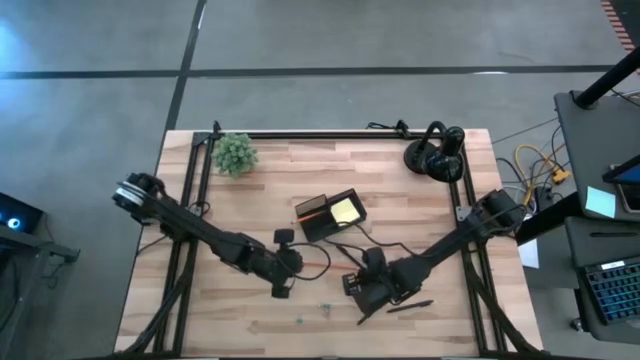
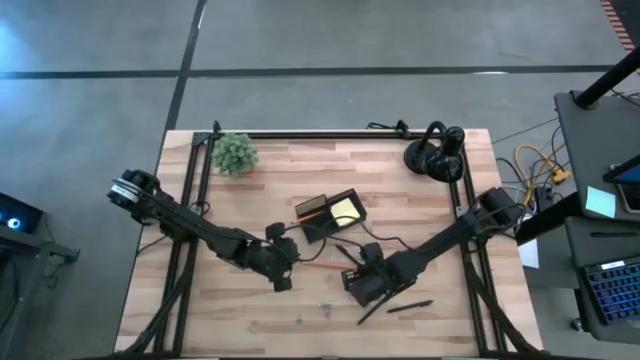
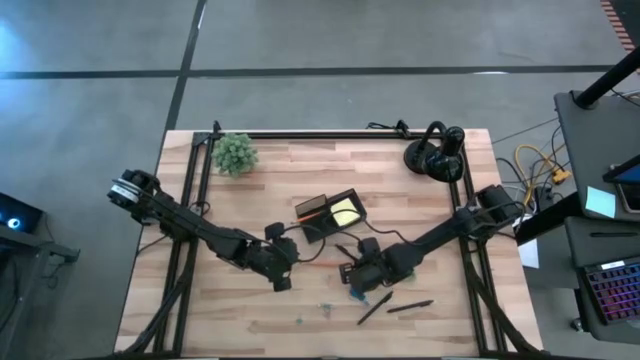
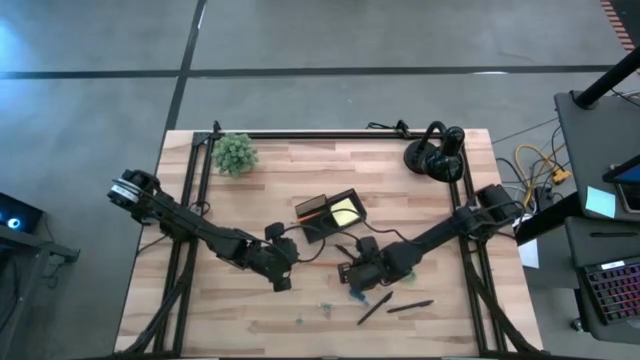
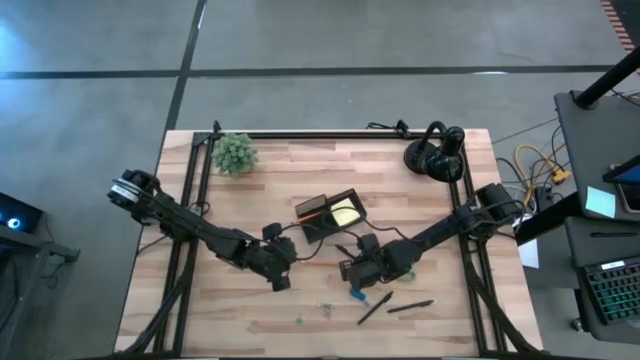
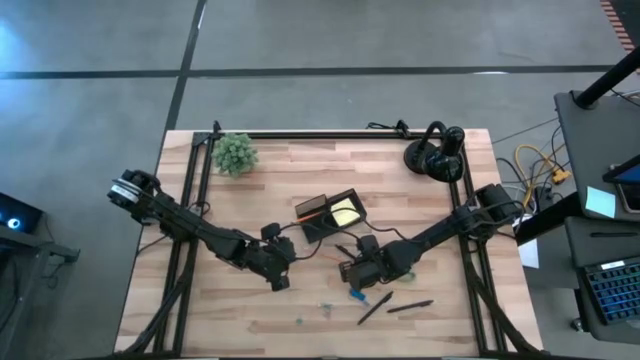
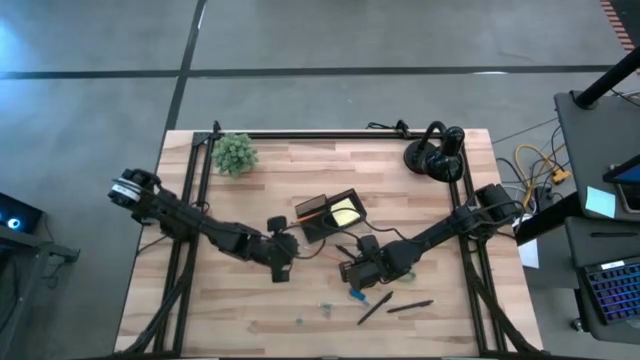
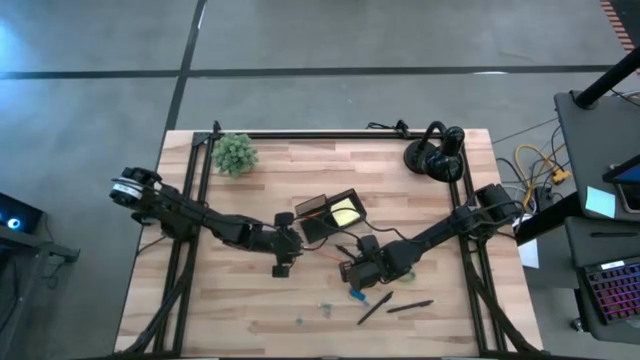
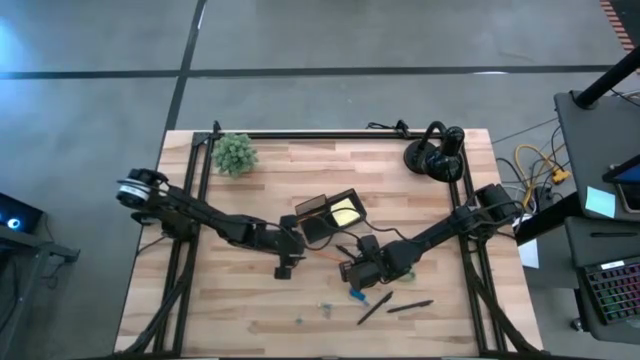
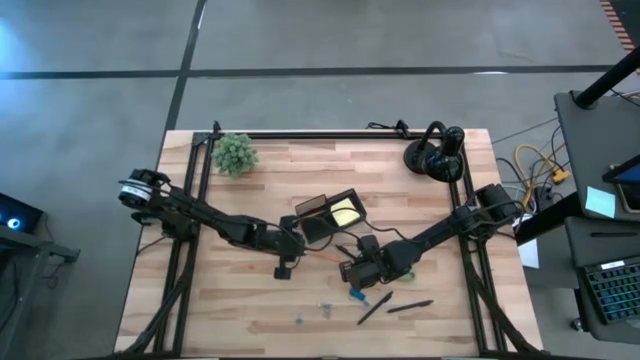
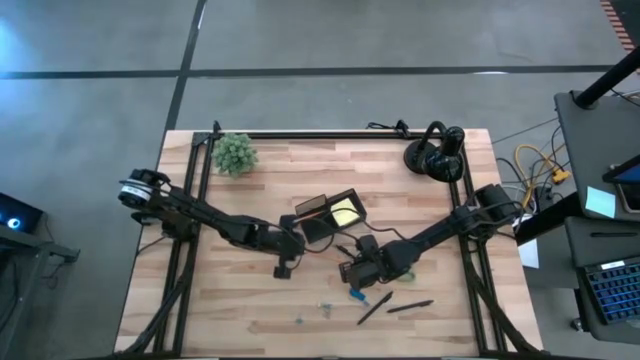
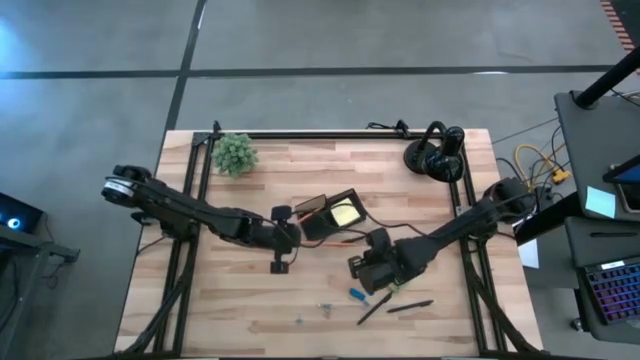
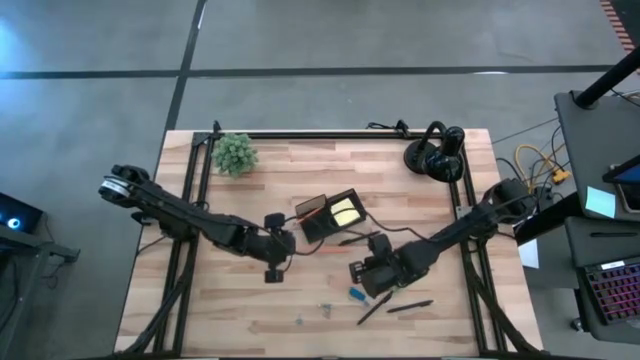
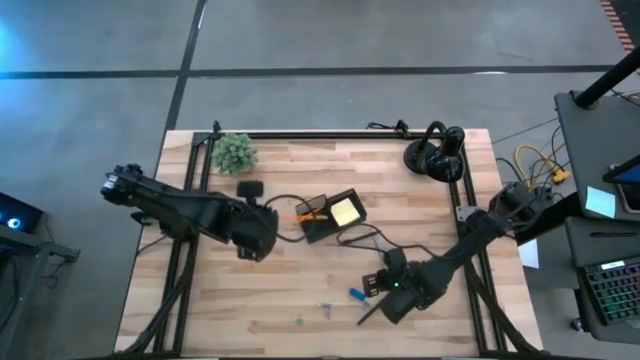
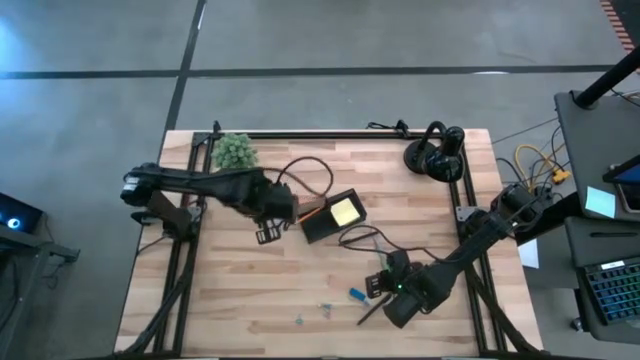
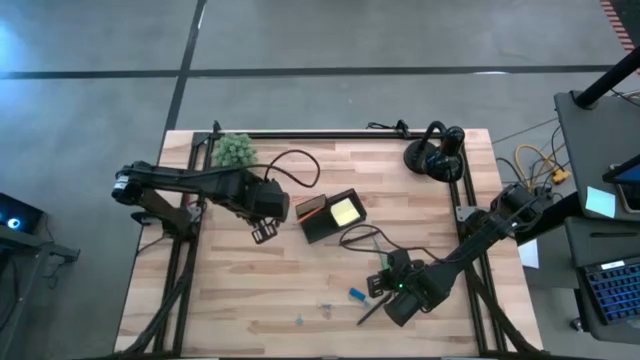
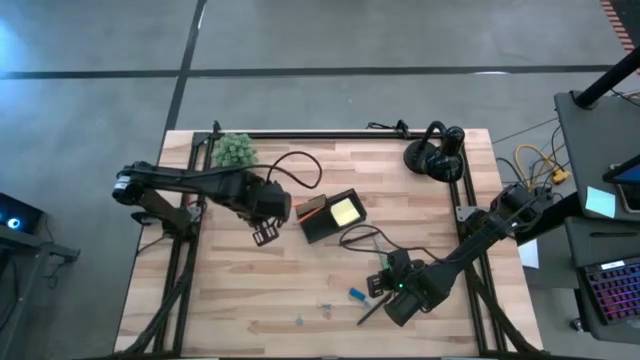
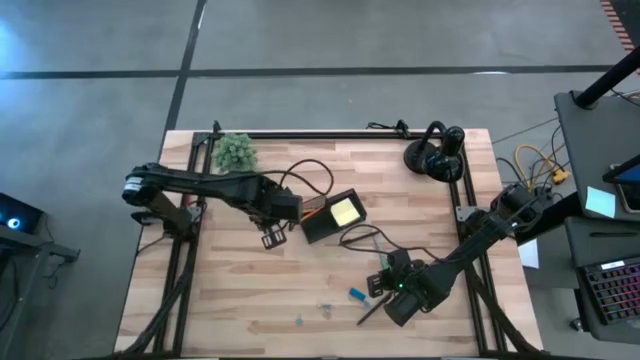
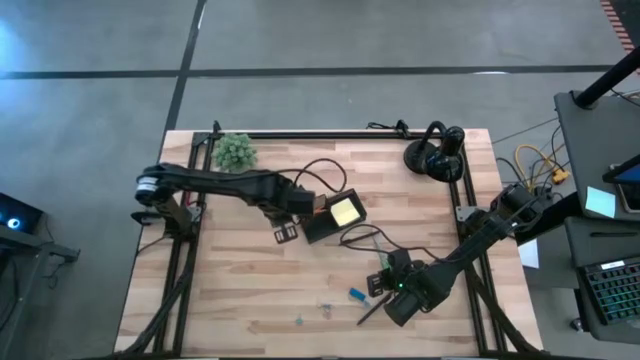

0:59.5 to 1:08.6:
Task: Pick and place office supplies into organizer
Put the orange pencil into the black desk organizer

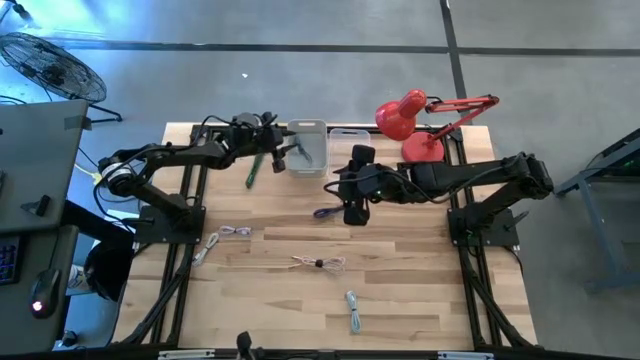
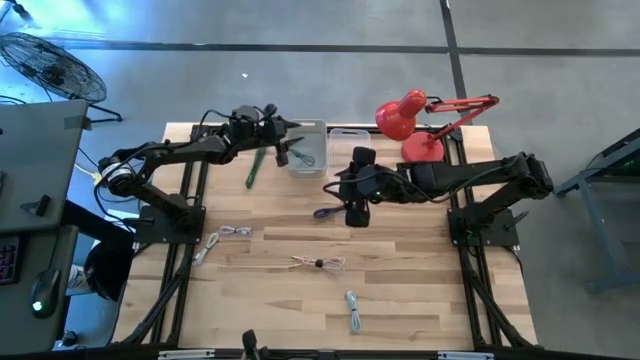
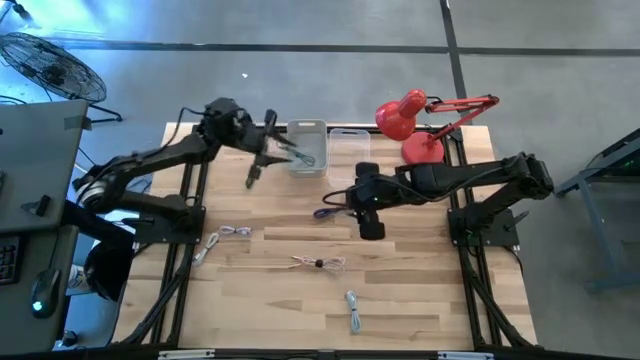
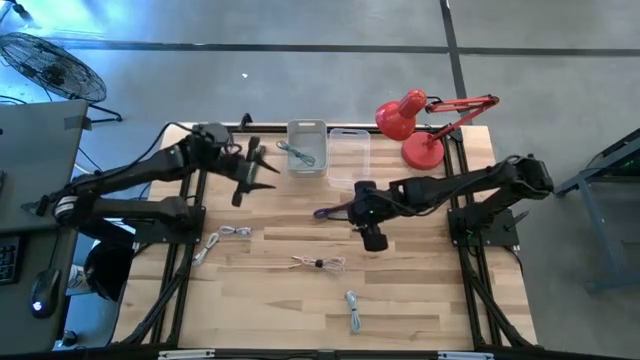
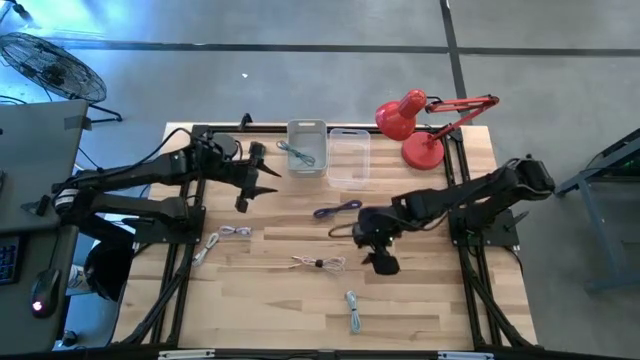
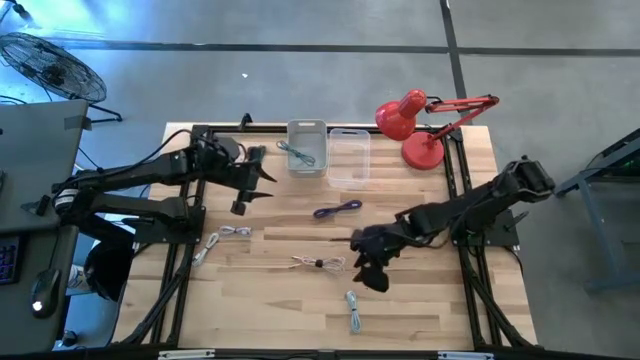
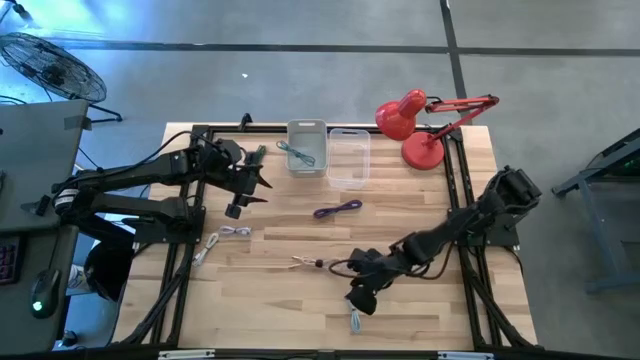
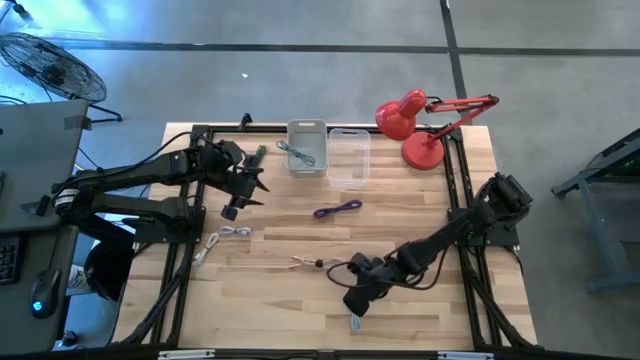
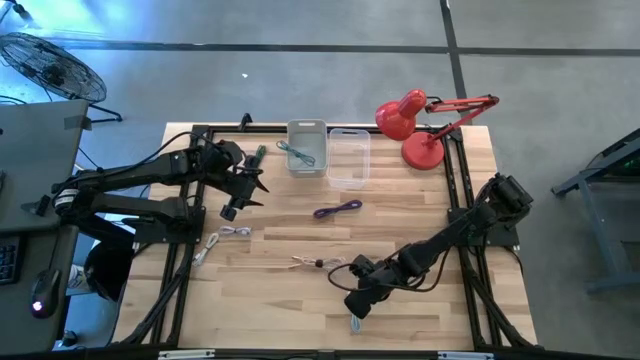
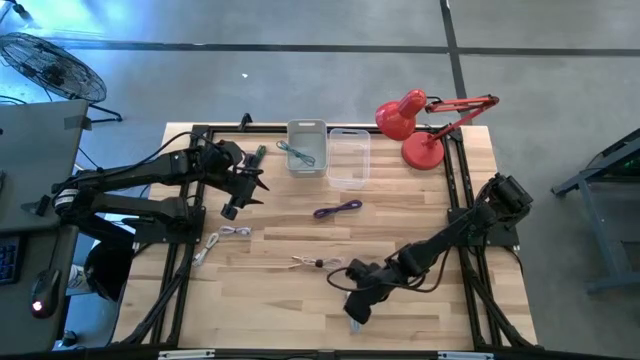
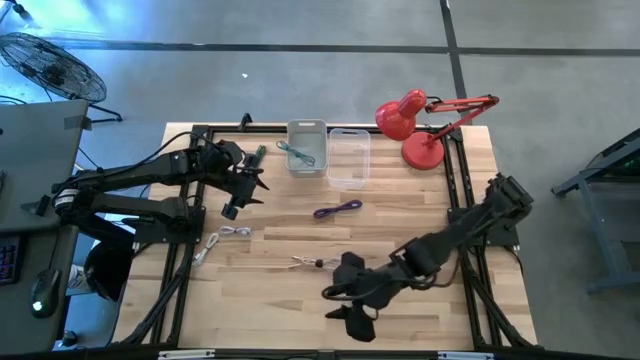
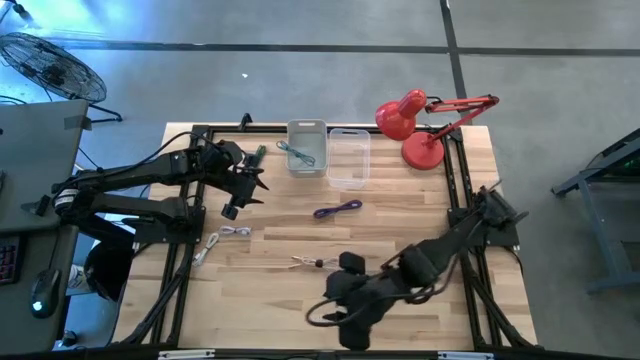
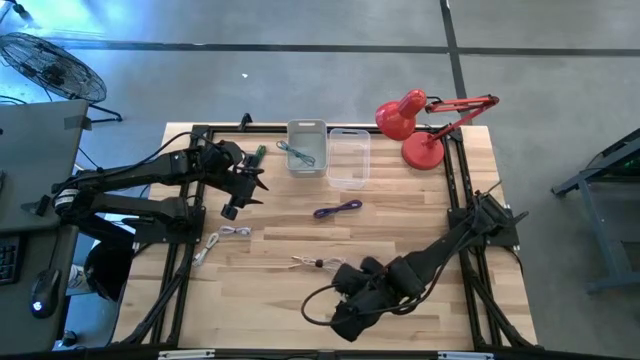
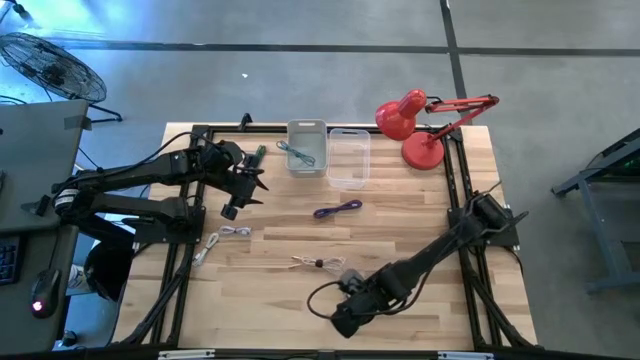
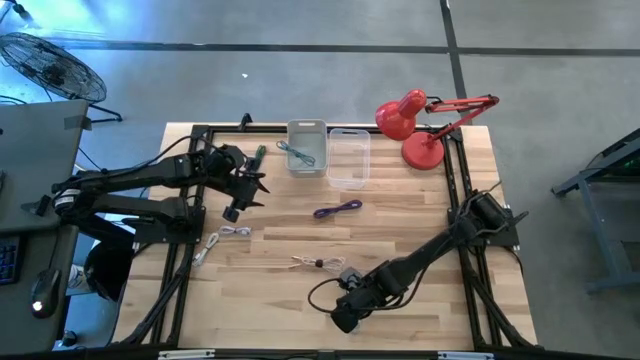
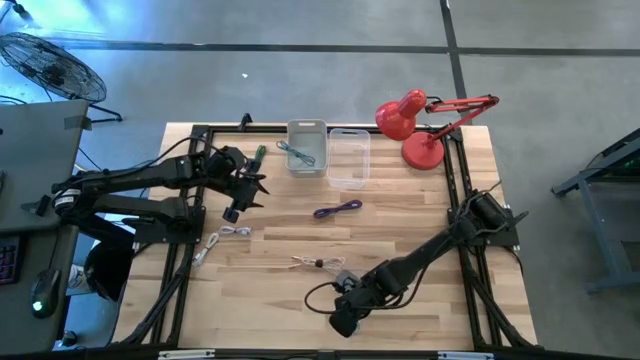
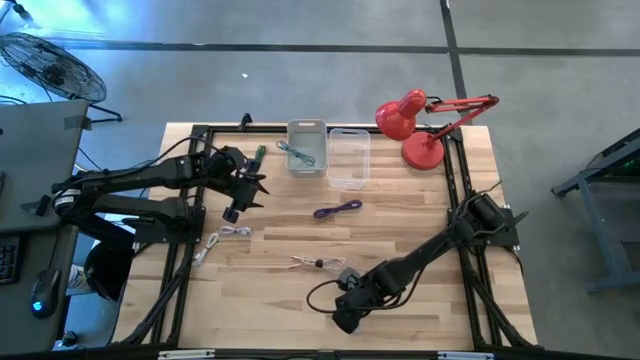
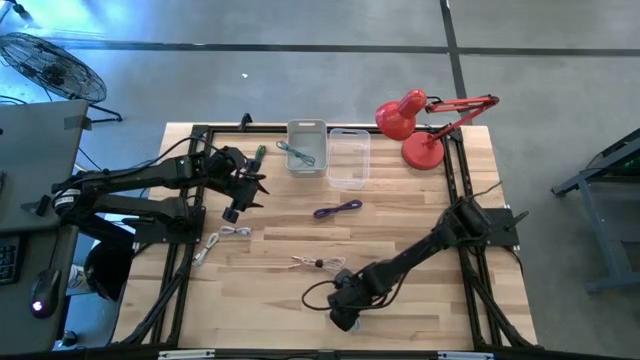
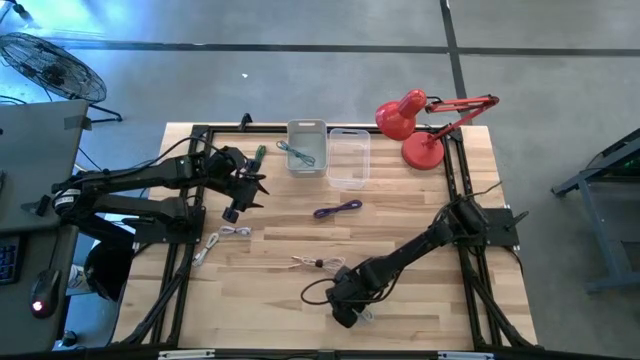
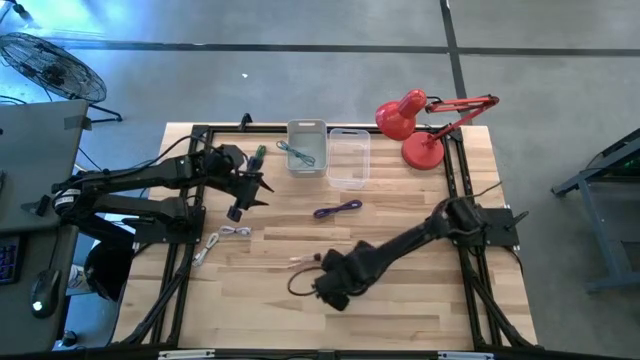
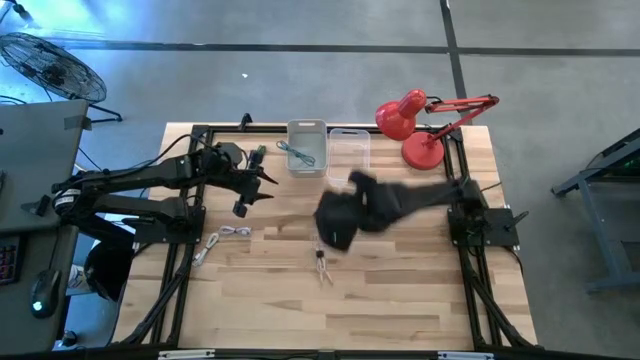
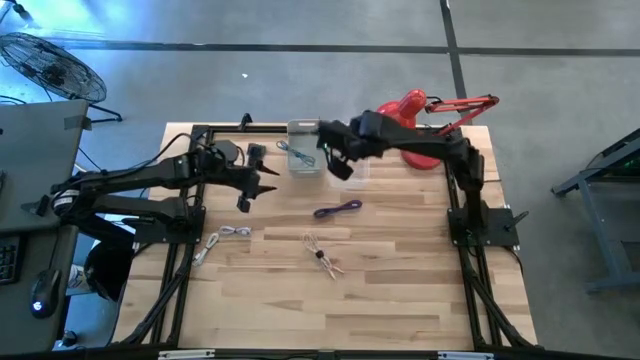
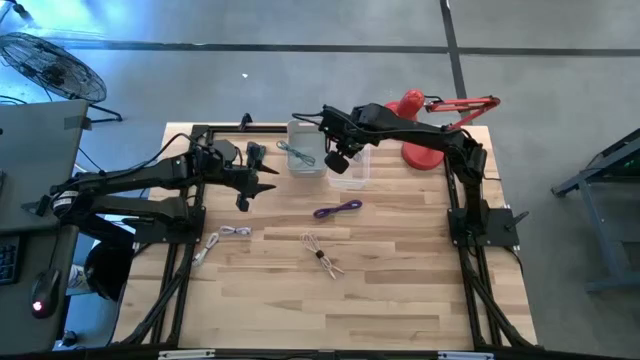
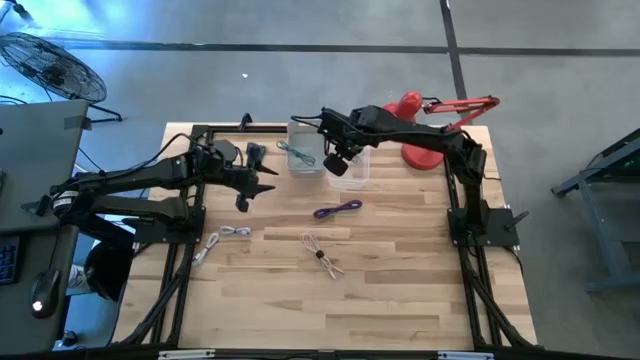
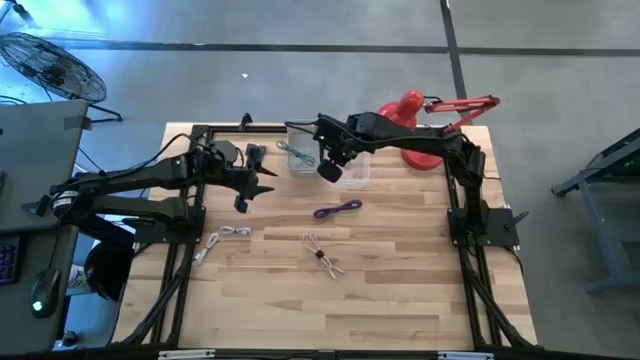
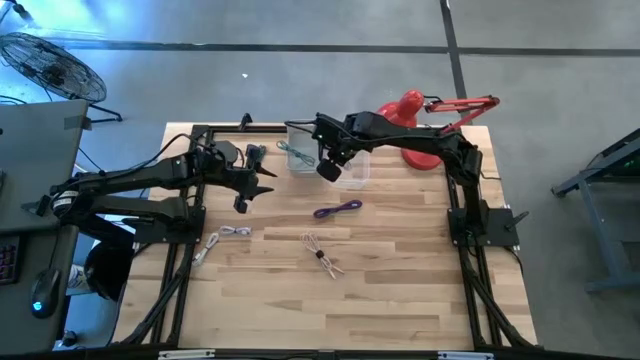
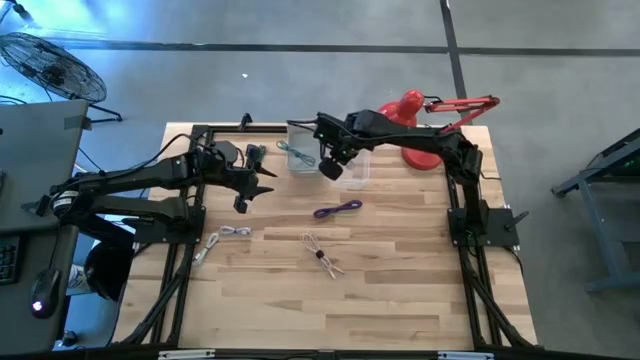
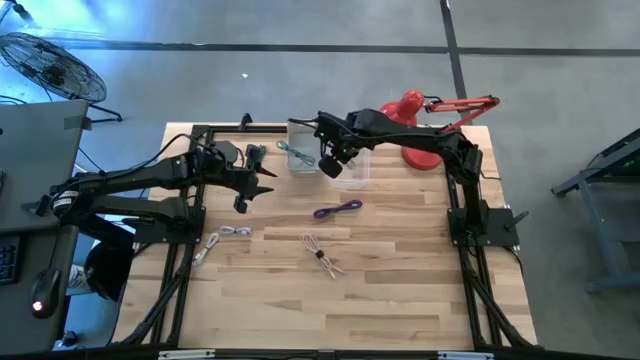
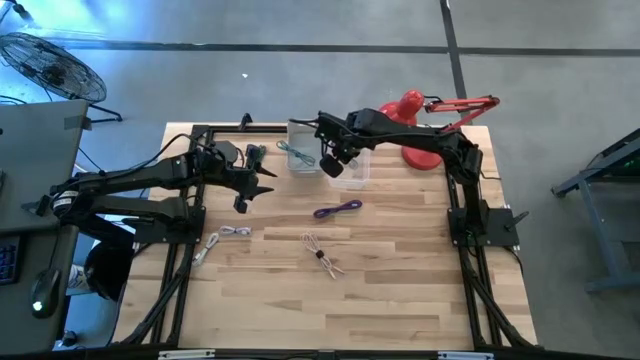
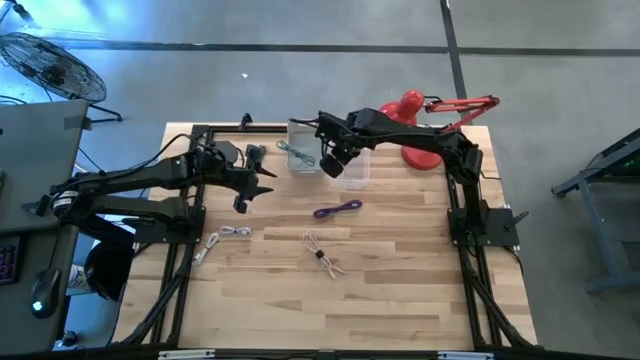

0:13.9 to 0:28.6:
Task: Pick & Place USB Port
Put the light blue charger cable into the transparent bin
